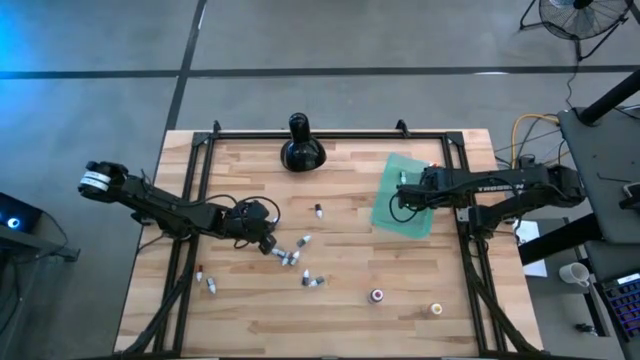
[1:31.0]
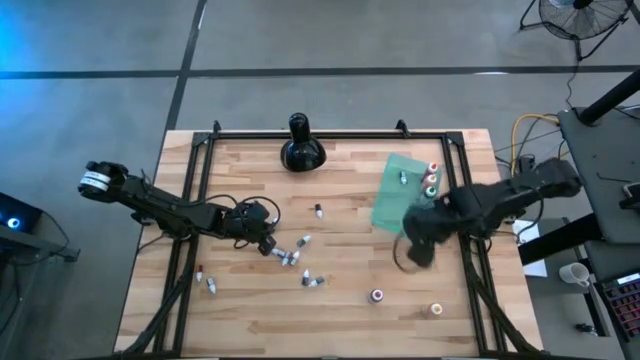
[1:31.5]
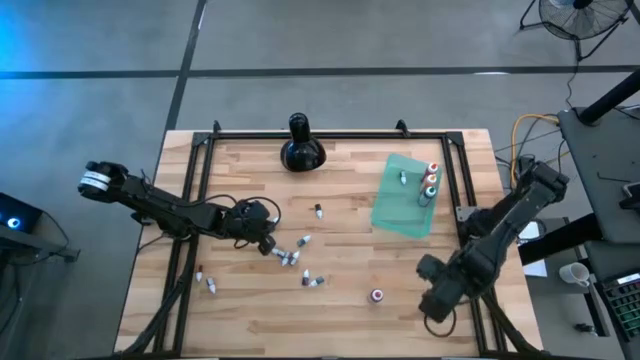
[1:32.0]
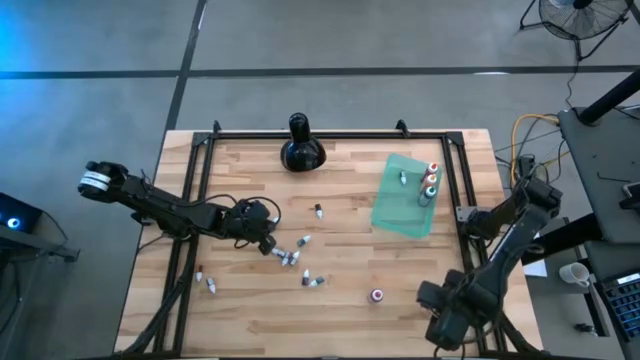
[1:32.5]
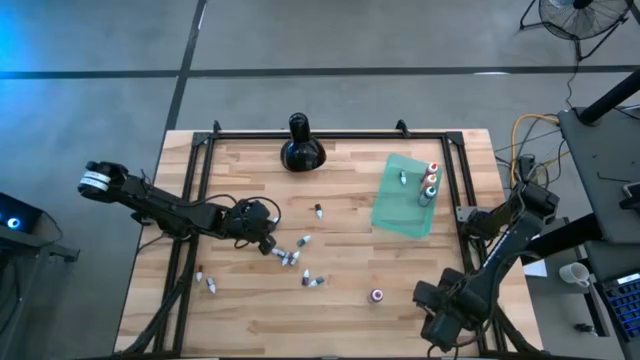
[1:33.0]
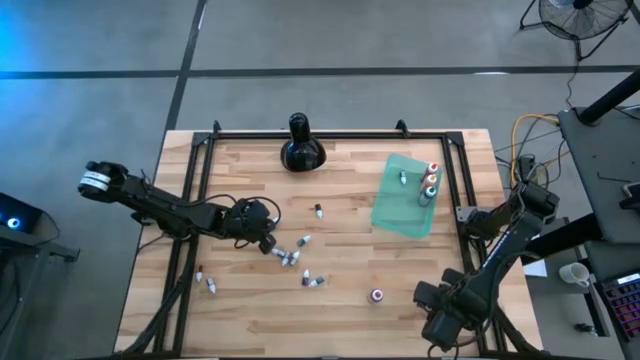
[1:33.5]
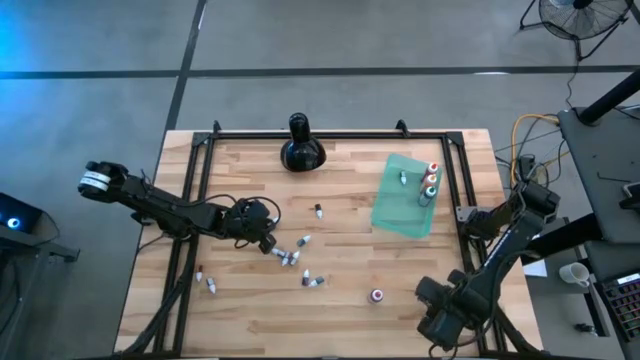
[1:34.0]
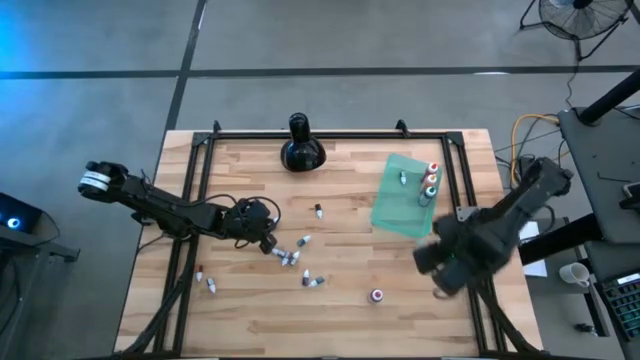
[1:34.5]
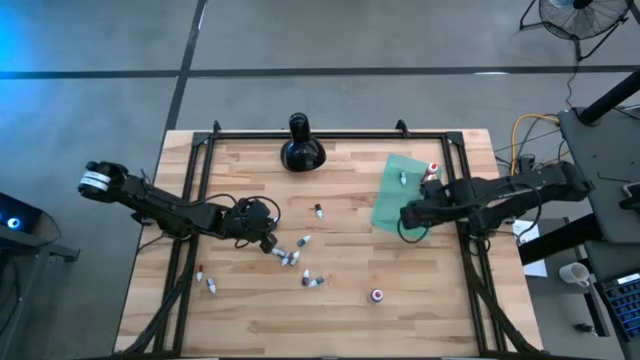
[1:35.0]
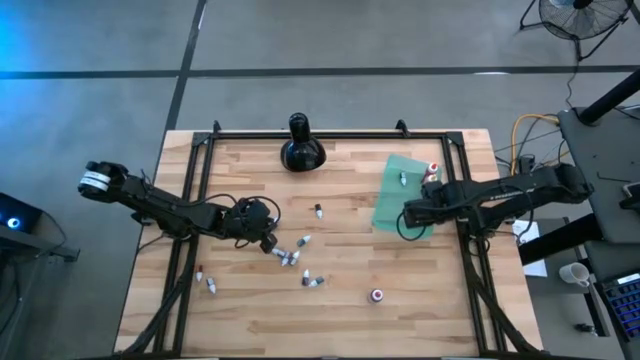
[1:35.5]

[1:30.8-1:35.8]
Task: Pick & Place food coloring
Put the large yellow food coloring bottle into the green bin

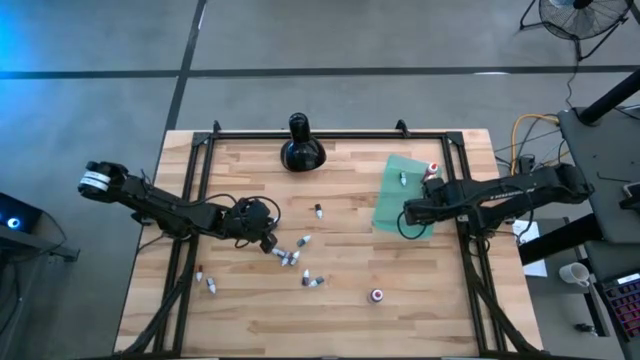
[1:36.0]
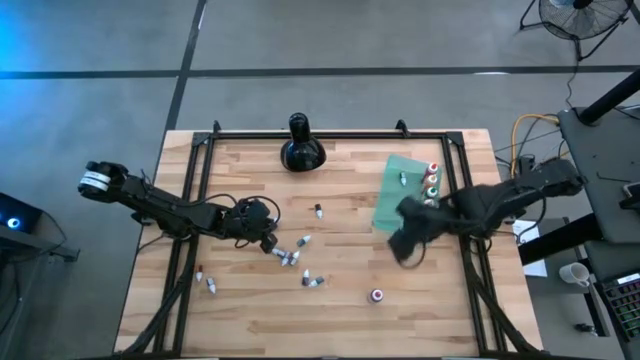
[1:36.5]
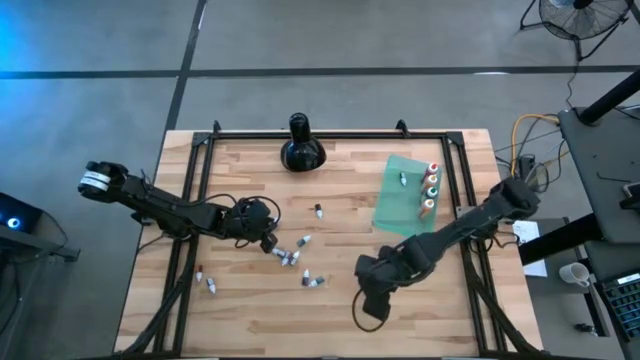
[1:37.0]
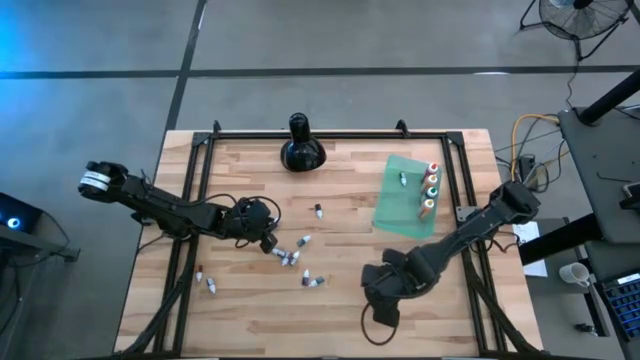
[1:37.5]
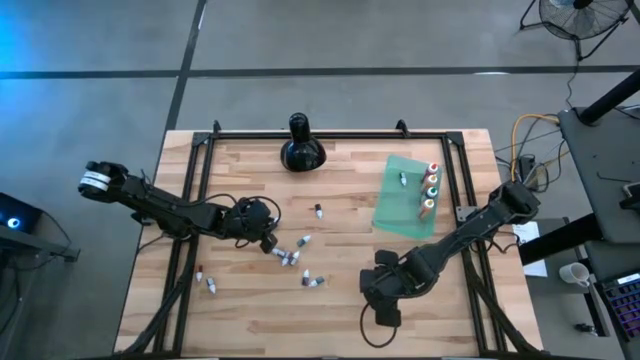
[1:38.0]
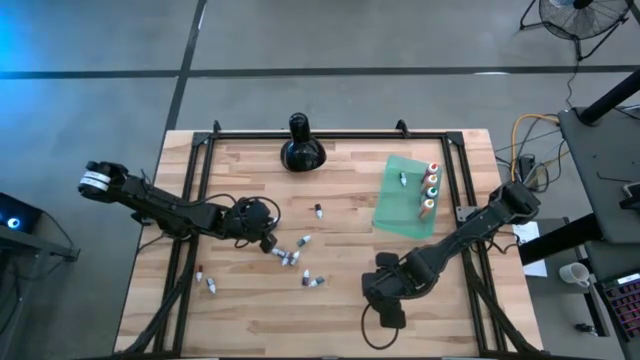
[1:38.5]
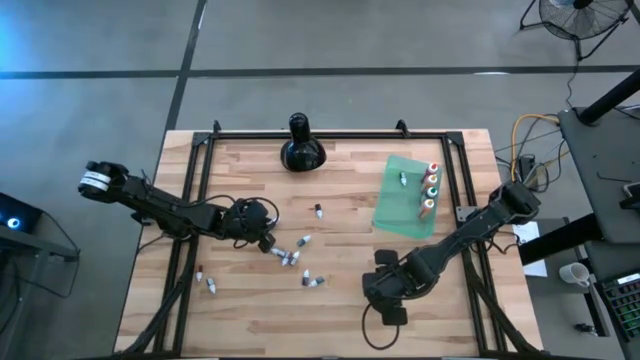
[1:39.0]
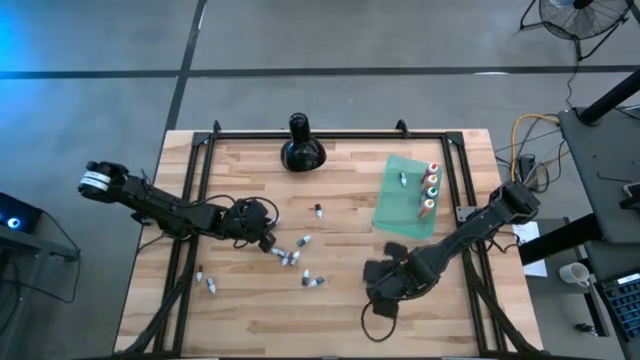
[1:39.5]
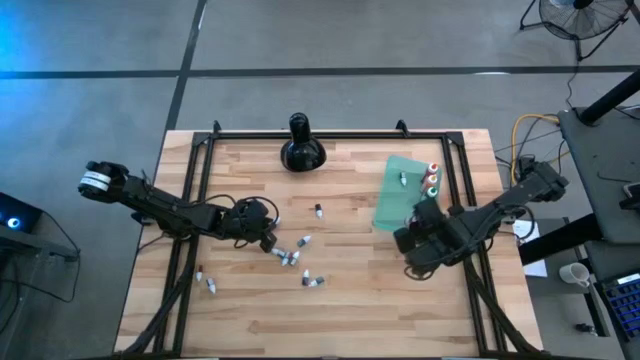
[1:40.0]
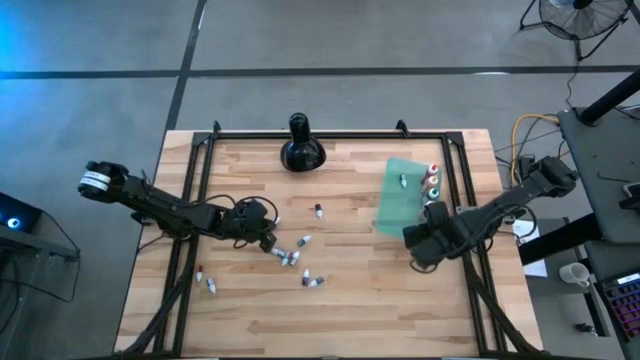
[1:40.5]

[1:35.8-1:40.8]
Put the large red food coloring food into the green bin

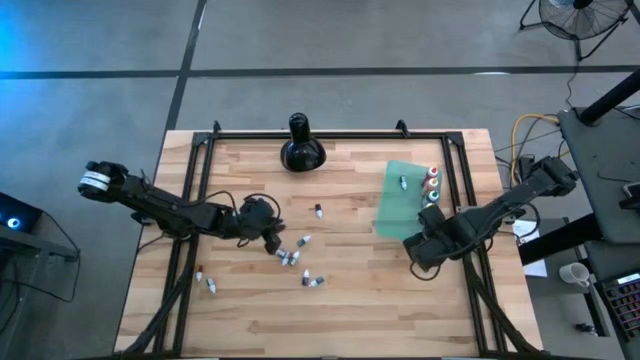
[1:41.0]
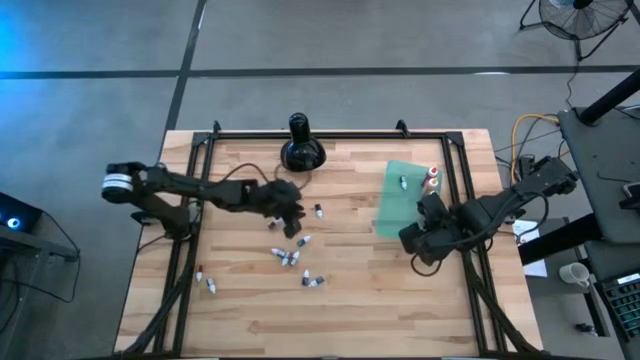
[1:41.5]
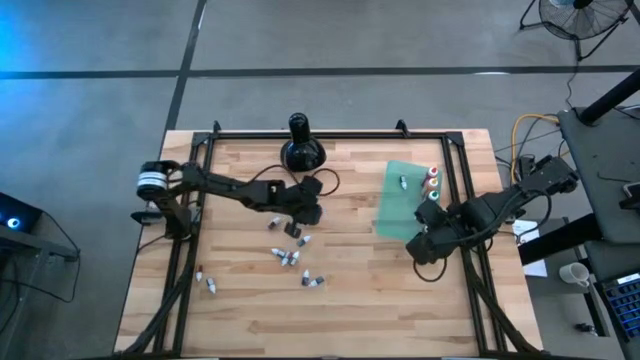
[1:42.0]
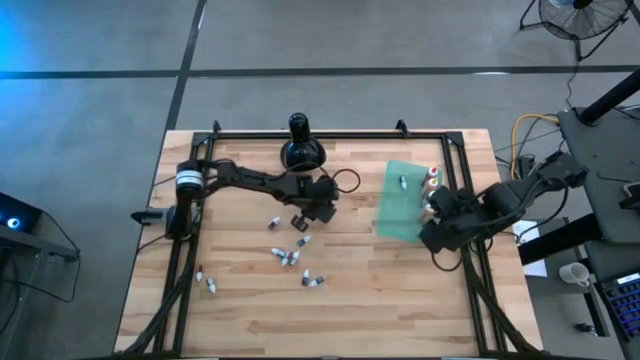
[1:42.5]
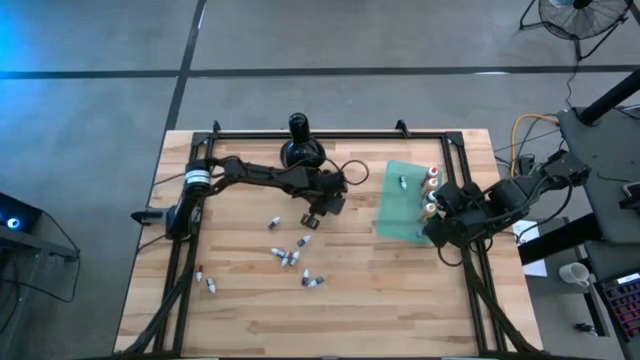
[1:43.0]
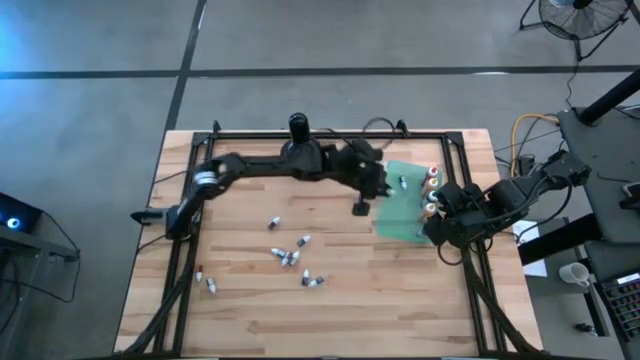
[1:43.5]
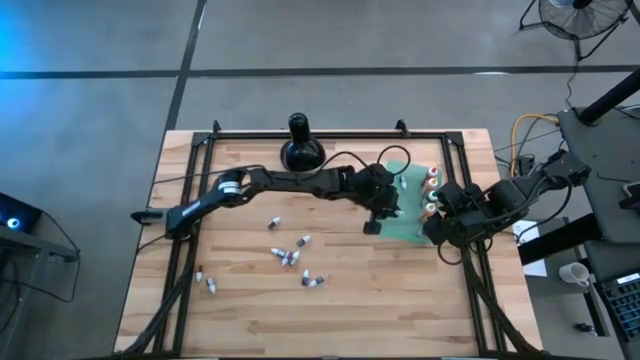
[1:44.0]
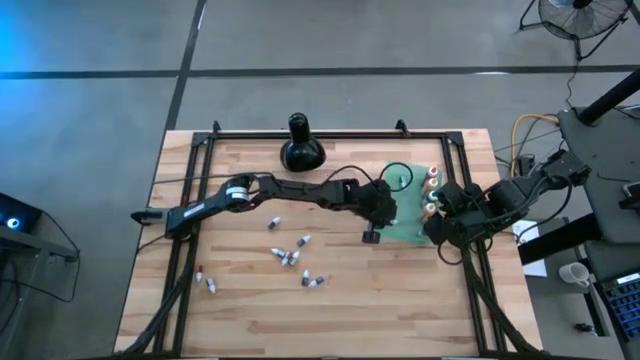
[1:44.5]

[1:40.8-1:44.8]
Put the top small black food coloring bottle into the green bin

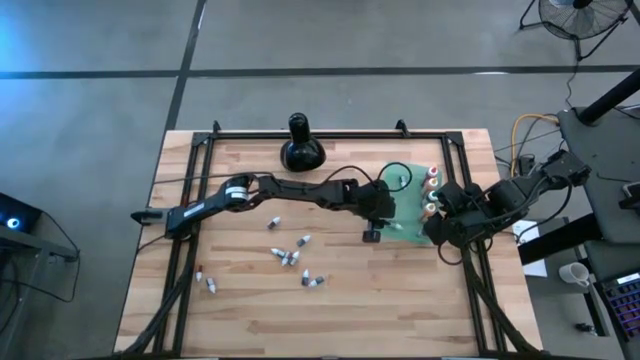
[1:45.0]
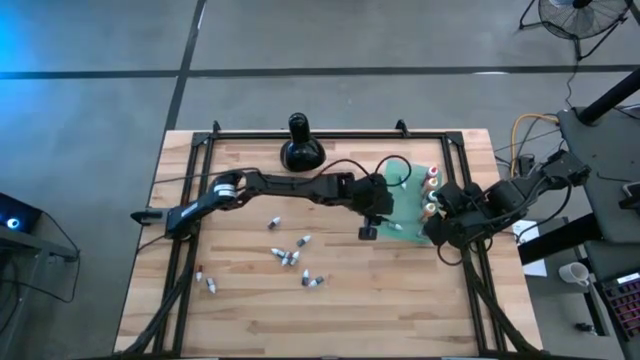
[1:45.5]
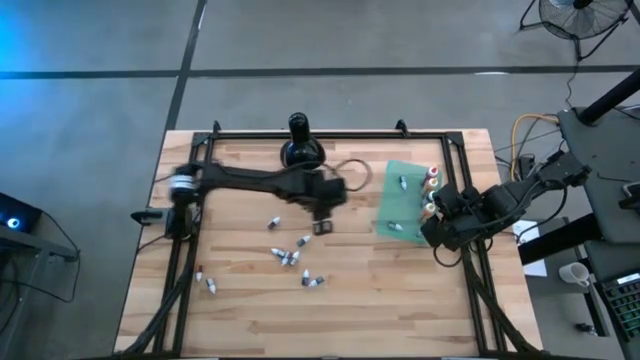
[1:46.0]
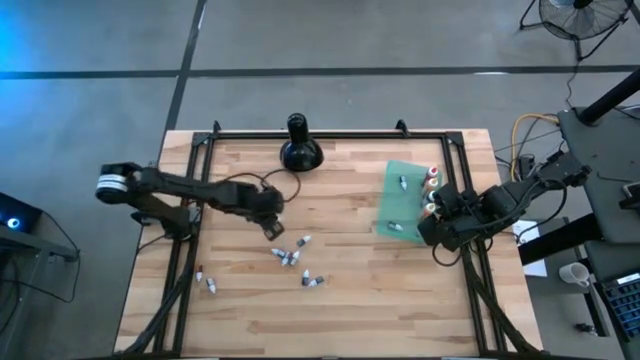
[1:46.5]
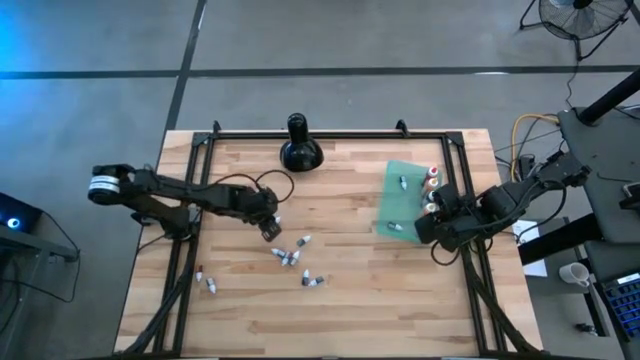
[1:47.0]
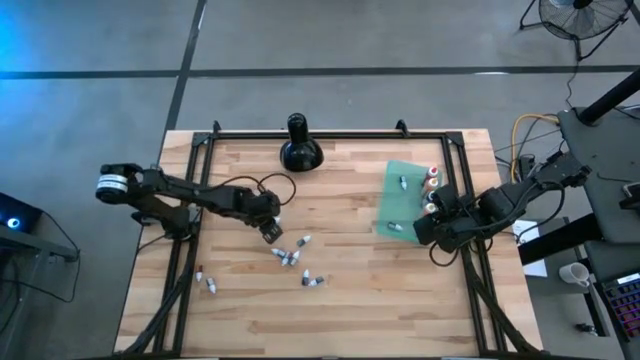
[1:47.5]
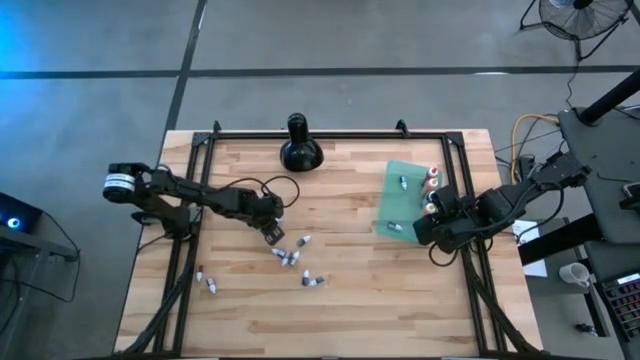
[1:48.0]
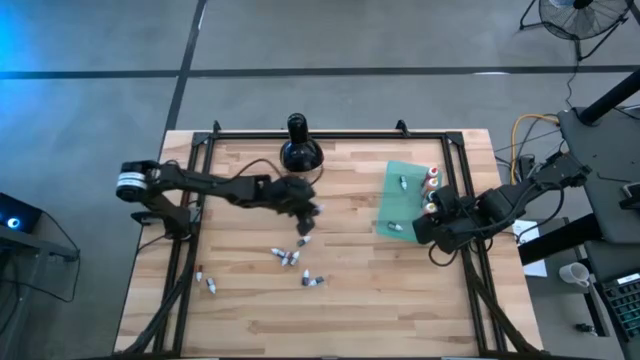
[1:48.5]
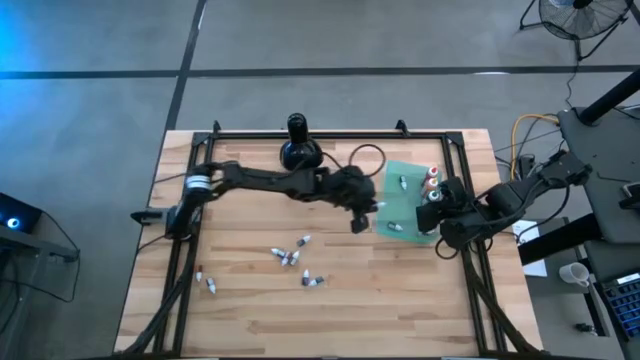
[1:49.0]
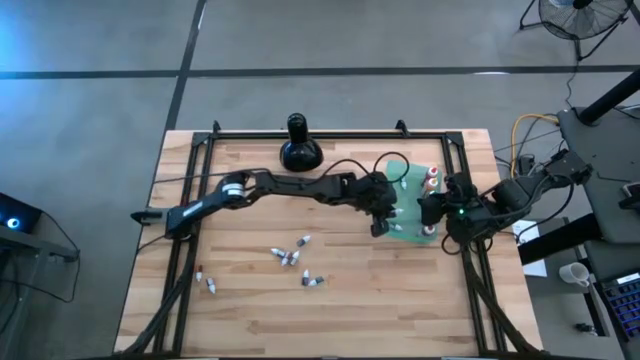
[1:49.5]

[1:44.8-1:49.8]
Put the top small red food coloring bottle into the green bin

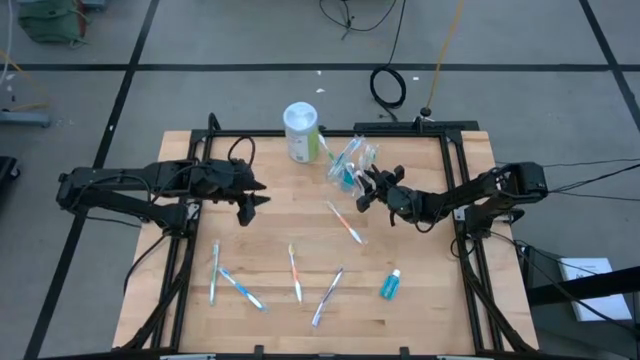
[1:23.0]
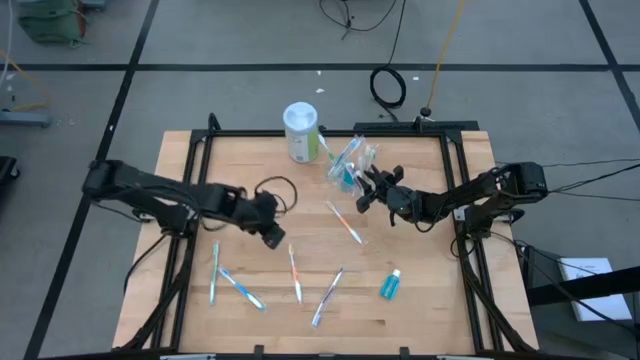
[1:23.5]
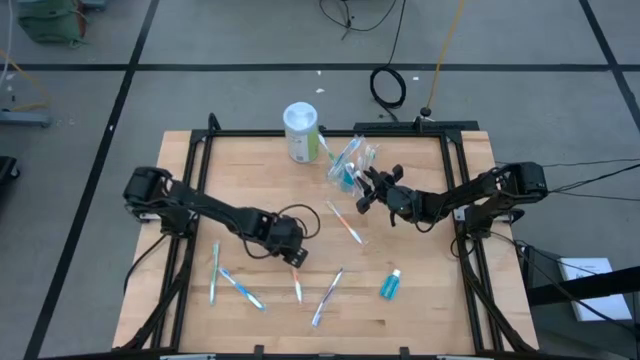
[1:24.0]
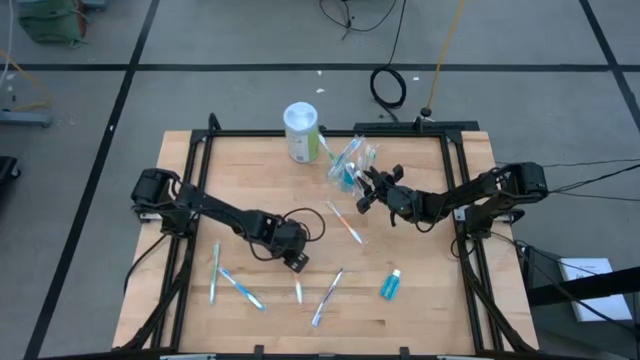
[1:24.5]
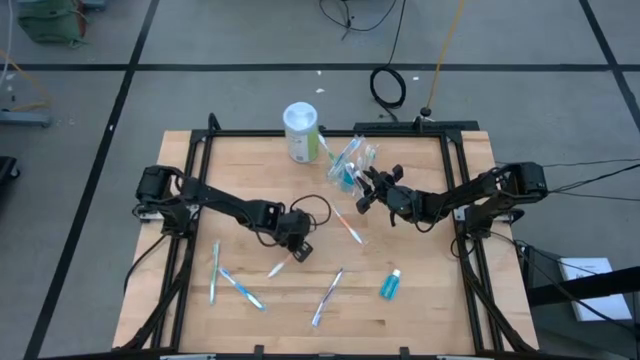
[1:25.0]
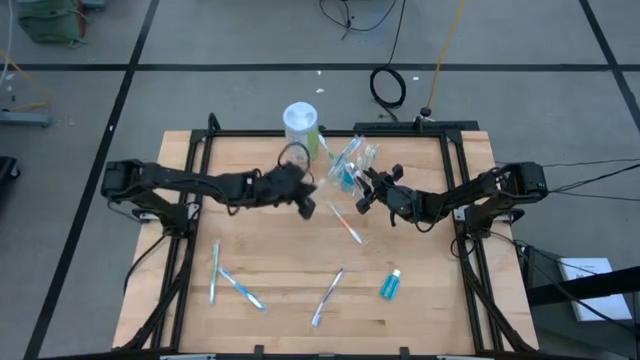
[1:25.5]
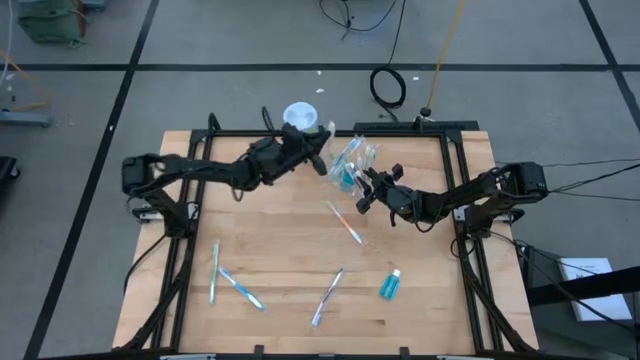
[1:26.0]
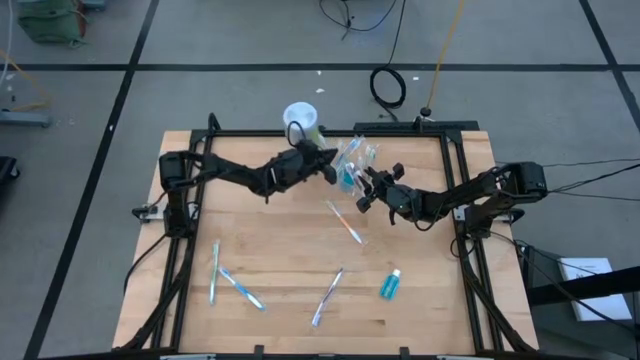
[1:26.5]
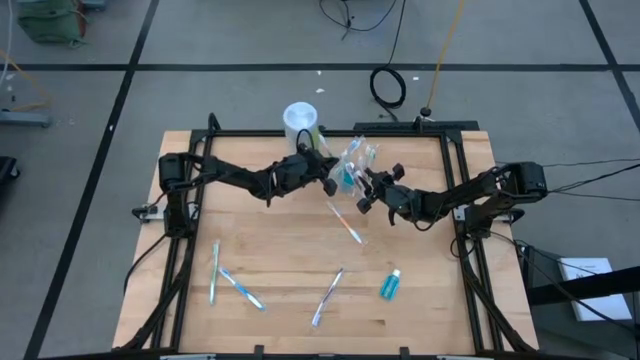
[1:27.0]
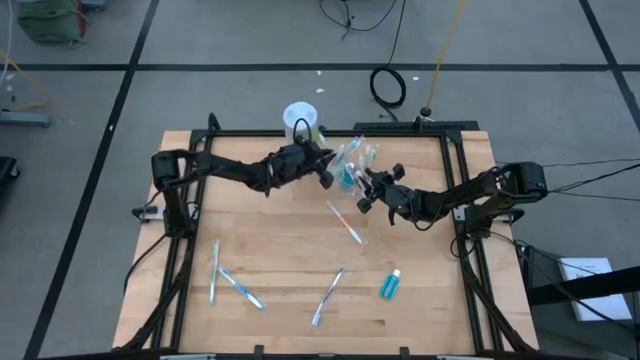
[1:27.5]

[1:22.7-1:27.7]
Task: Pick & Place toothbrushing station
Put the orange toothbrush into the transparent organizer
